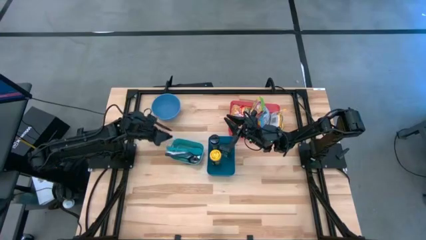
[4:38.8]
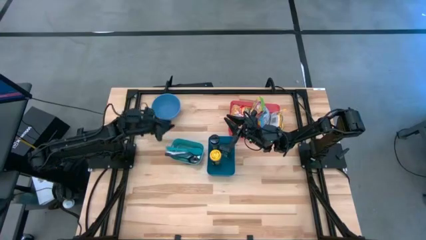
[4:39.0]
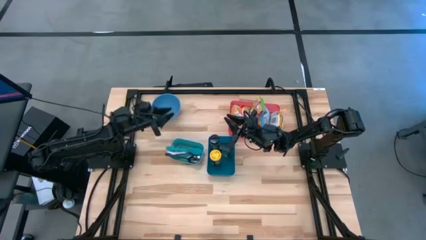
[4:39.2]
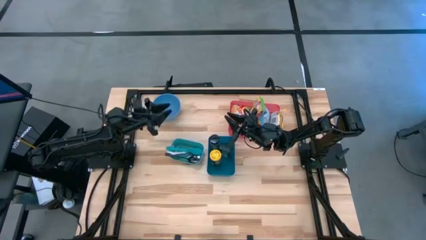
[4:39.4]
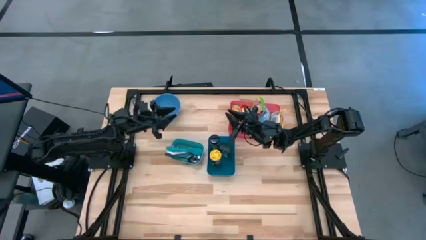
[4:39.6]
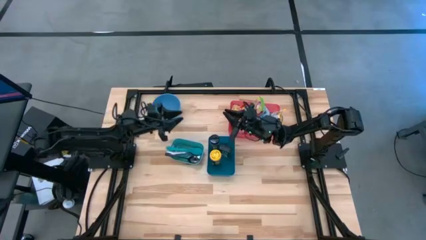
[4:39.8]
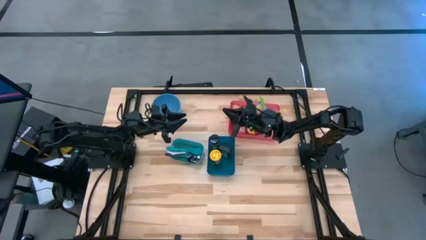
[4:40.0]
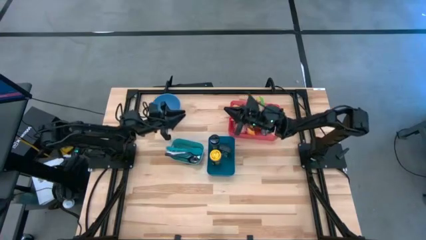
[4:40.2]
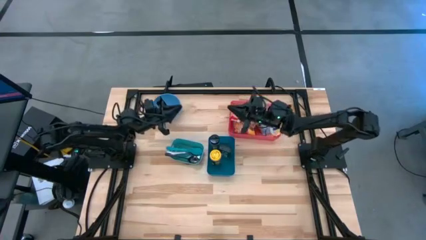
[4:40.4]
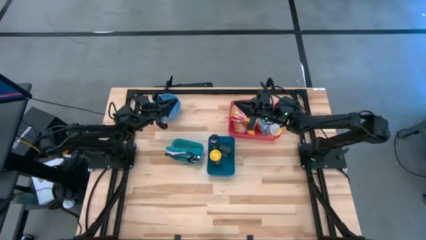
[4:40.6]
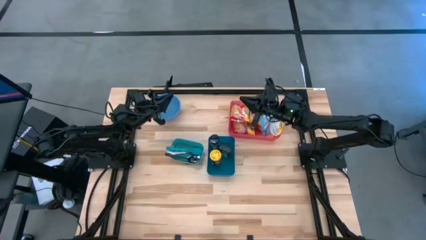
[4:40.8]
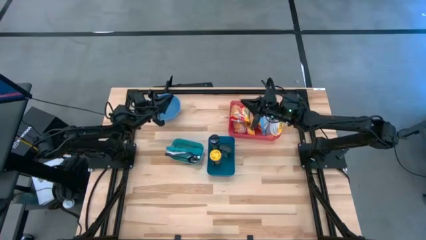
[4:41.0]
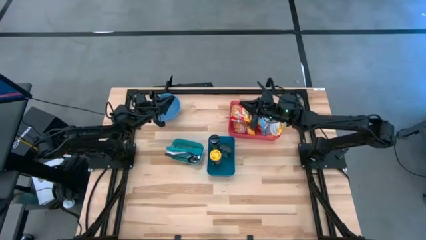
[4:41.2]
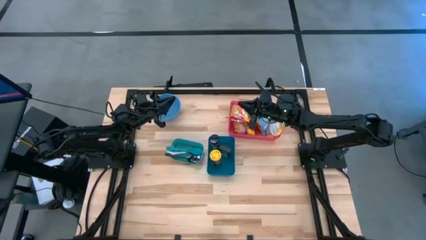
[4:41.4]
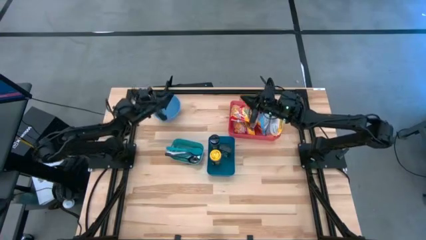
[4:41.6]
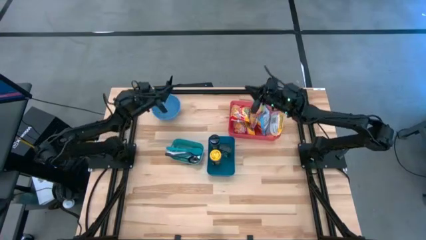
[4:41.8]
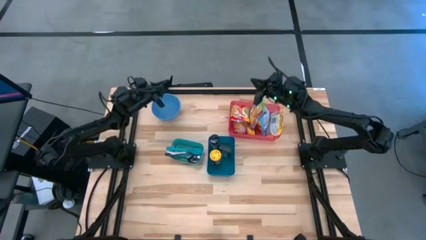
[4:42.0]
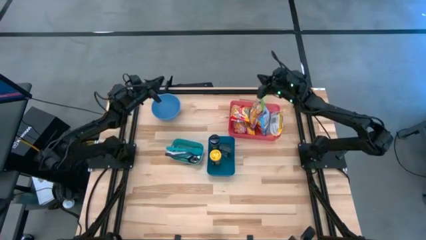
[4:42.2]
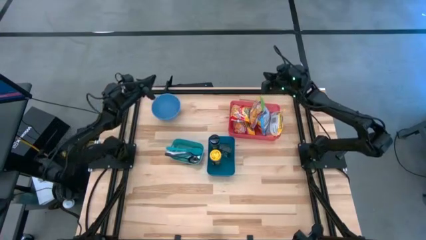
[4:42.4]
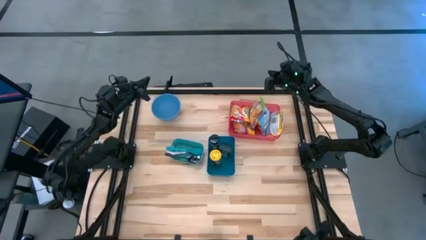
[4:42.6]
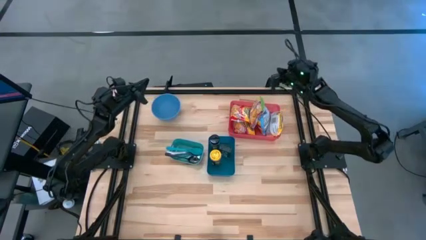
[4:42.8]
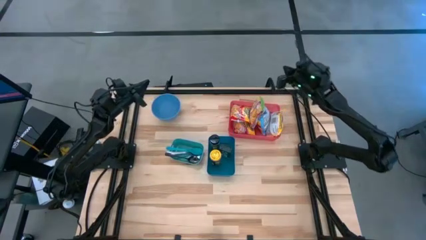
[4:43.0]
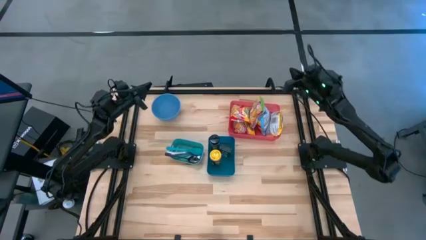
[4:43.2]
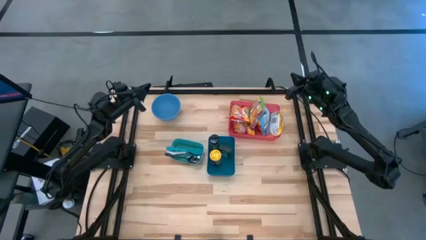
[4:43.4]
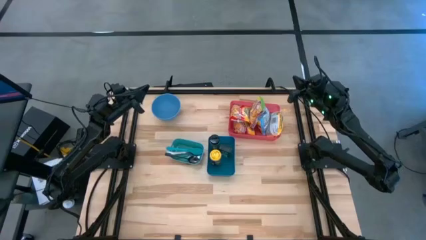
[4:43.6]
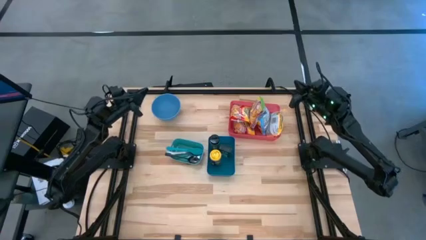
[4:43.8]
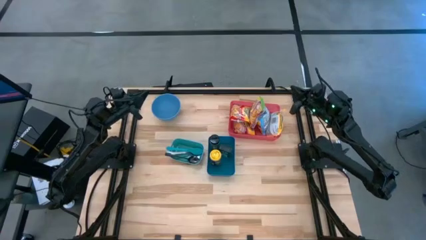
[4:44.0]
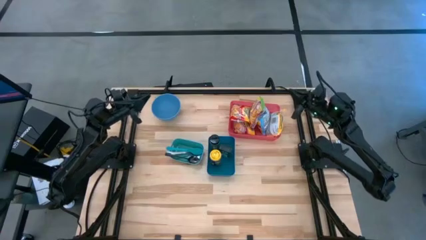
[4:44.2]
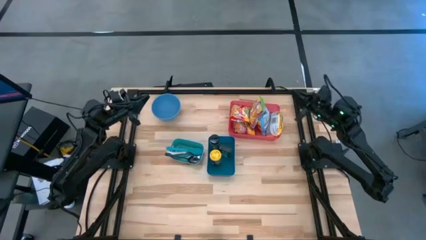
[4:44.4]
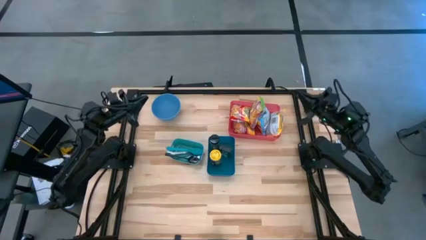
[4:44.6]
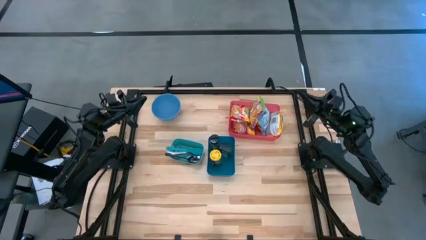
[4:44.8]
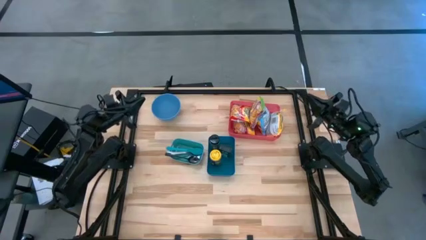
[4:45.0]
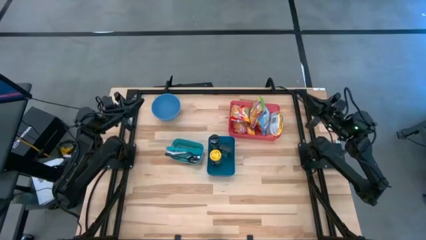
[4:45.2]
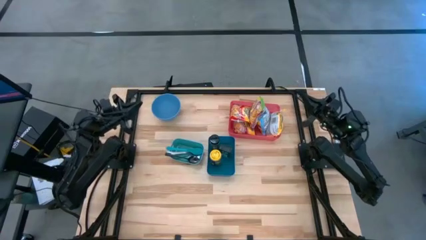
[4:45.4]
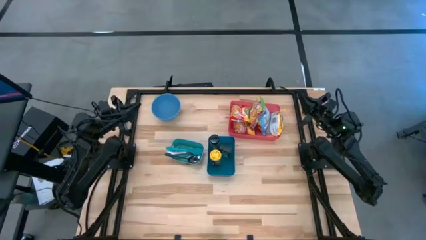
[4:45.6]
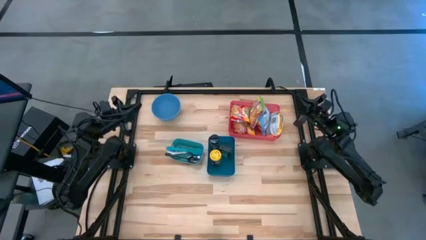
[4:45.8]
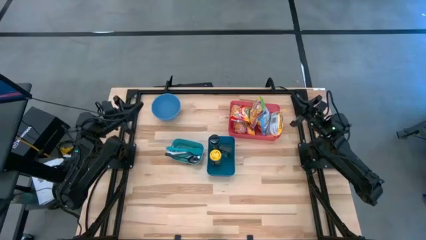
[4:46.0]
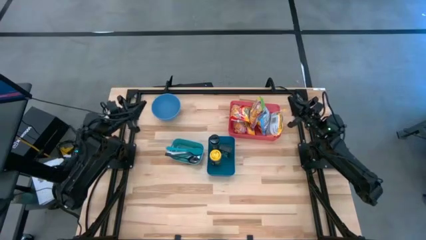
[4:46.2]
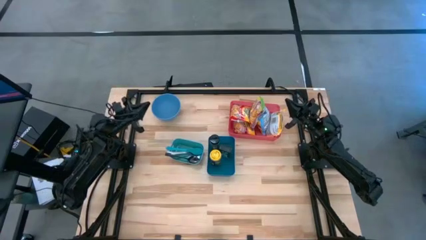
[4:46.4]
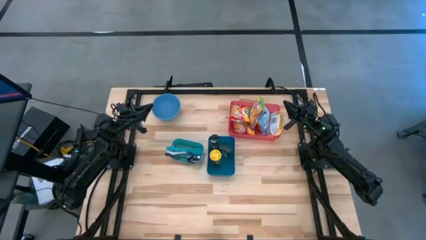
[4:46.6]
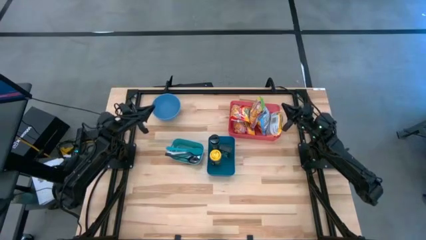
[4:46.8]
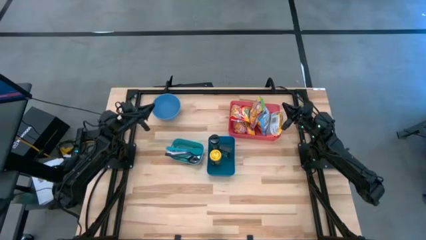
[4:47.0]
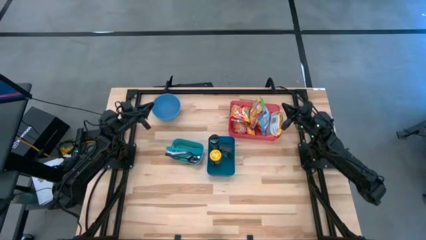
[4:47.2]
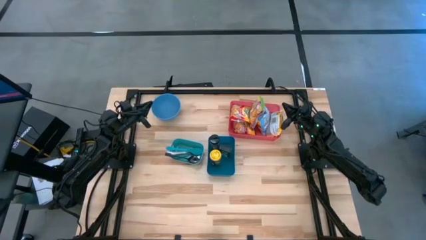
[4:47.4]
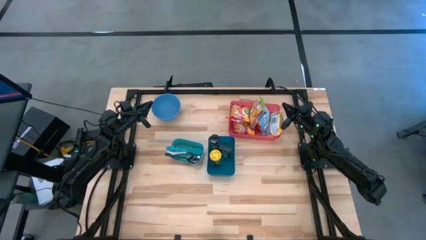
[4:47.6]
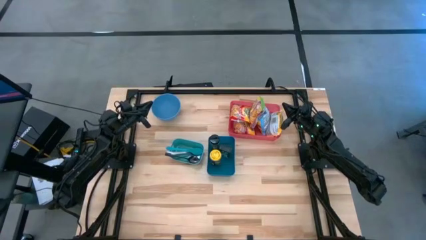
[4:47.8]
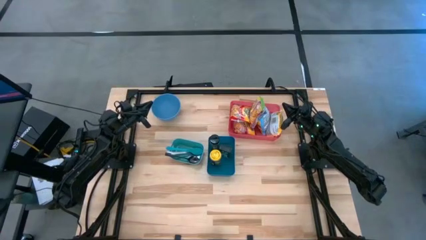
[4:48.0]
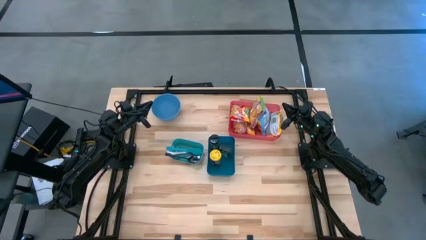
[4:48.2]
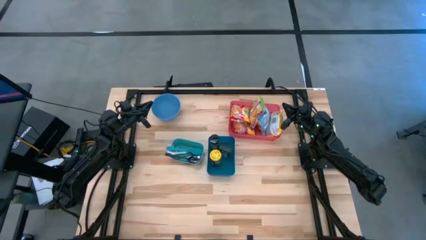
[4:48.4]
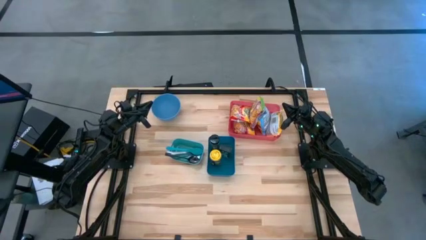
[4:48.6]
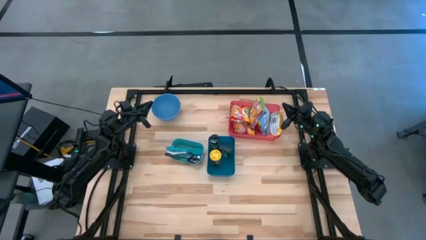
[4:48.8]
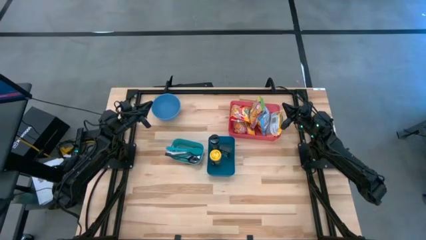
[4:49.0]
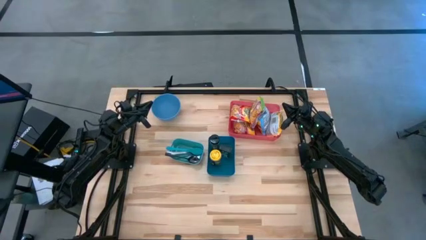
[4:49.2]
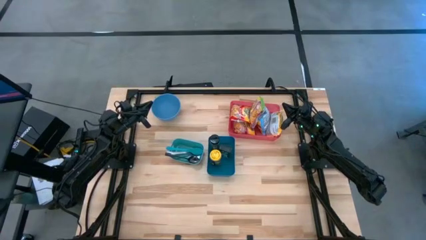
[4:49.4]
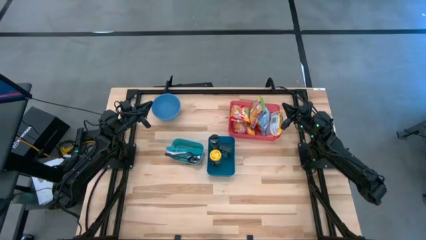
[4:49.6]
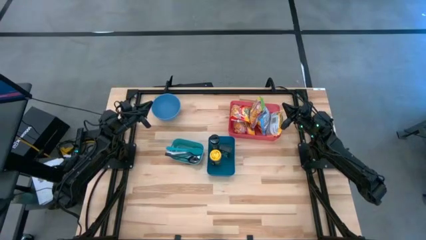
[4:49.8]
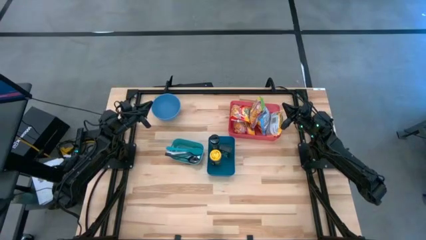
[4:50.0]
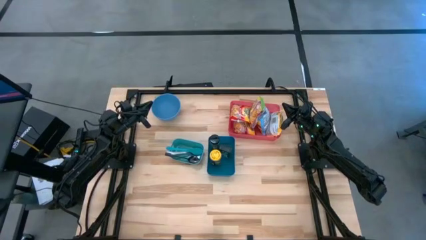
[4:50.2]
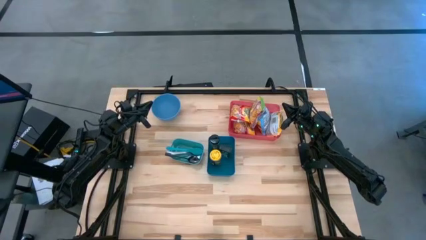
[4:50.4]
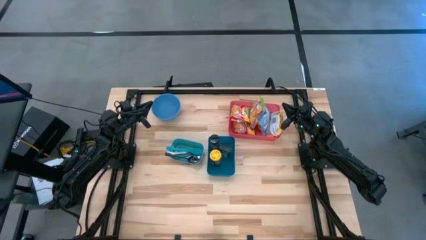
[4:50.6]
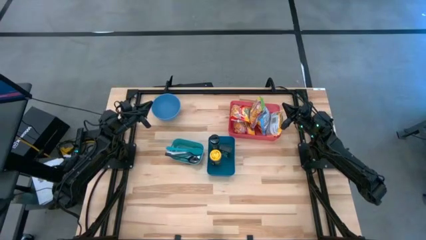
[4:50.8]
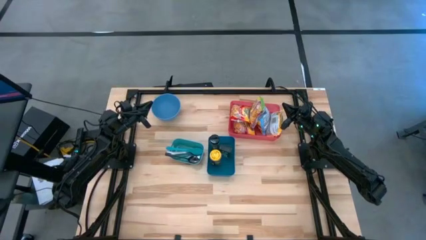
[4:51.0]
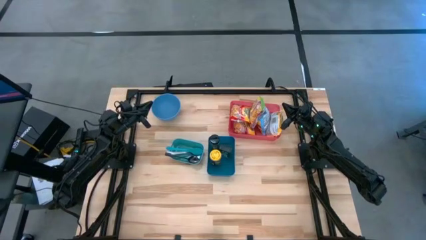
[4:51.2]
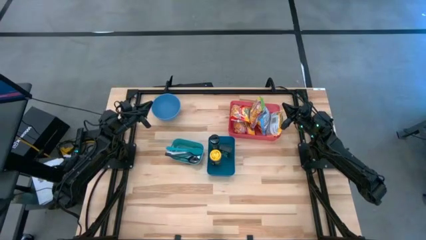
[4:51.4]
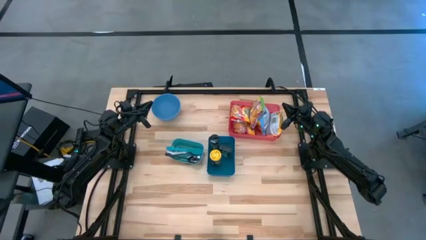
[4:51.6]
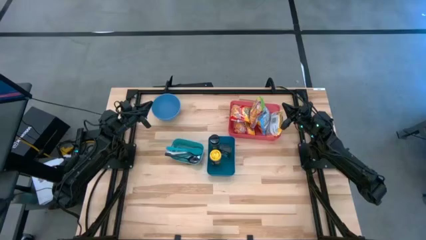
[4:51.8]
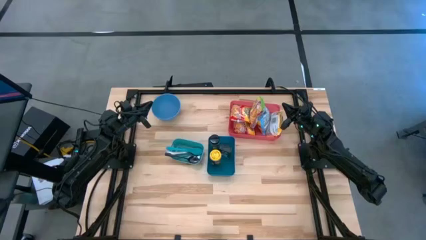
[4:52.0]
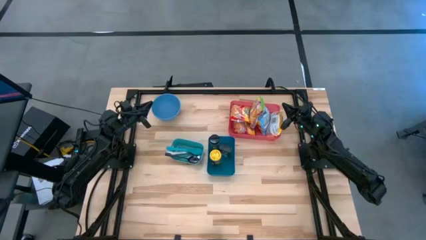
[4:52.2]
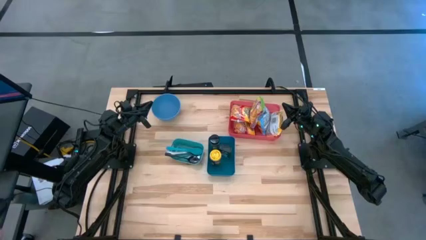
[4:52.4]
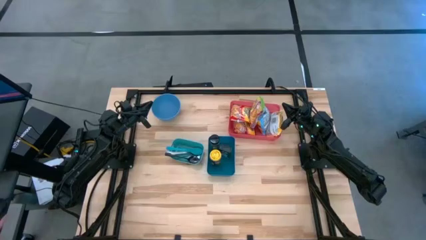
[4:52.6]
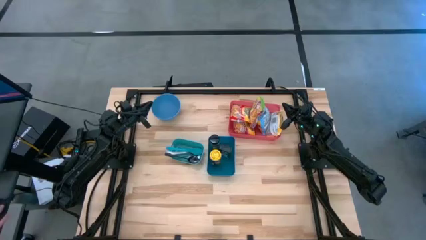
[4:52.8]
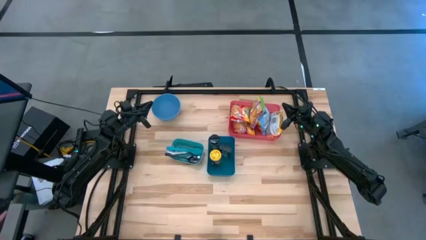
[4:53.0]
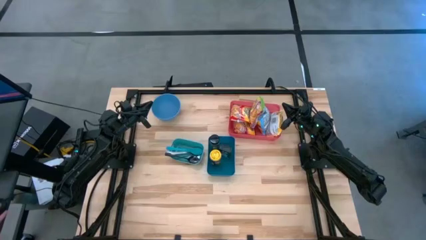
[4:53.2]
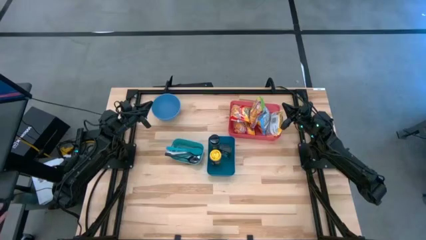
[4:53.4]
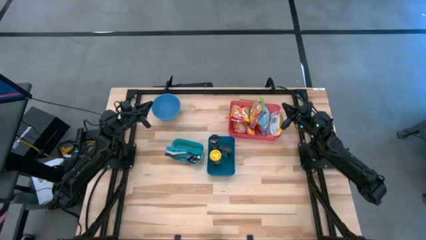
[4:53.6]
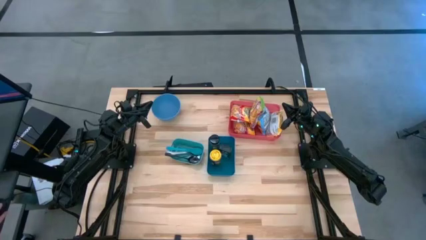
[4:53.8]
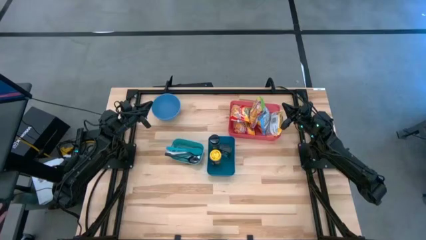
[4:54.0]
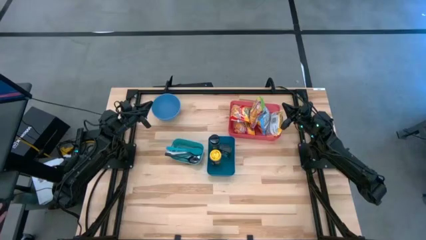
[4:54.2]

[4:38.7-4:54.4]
Task: Pick & Place Food Item
Return to Home Position

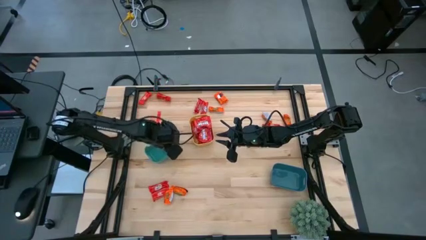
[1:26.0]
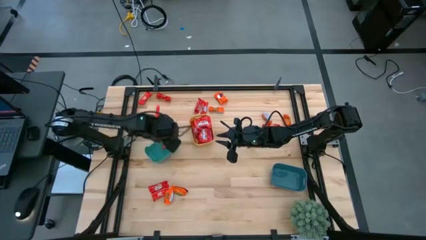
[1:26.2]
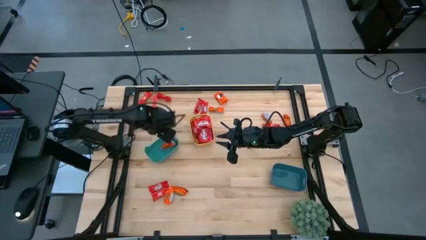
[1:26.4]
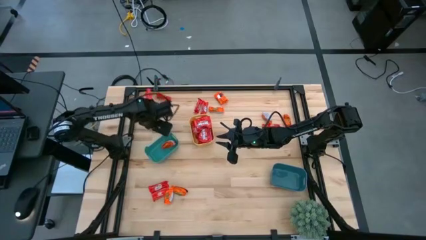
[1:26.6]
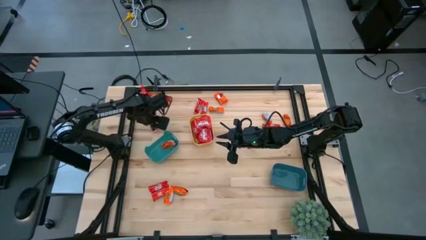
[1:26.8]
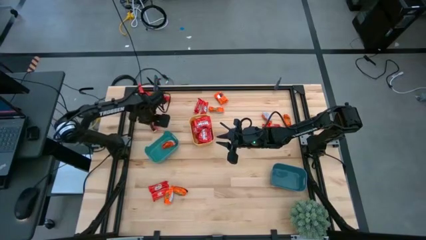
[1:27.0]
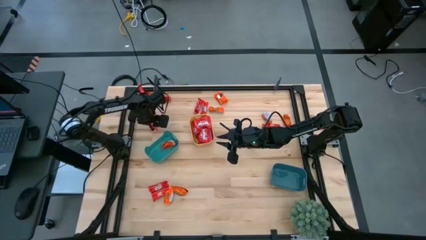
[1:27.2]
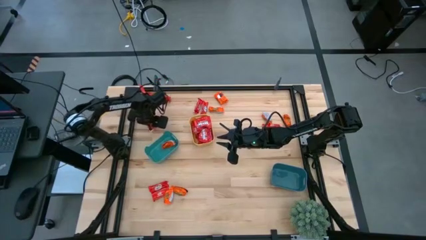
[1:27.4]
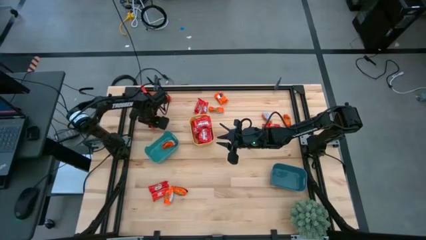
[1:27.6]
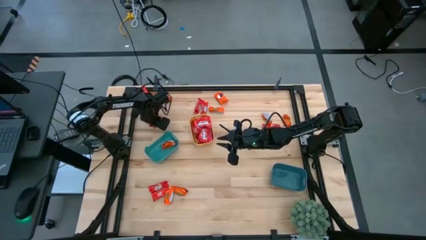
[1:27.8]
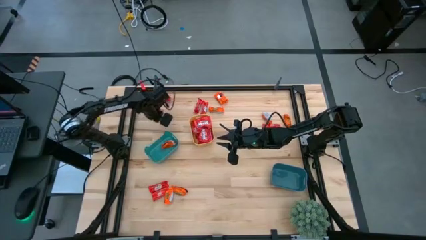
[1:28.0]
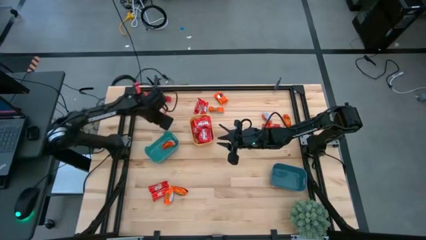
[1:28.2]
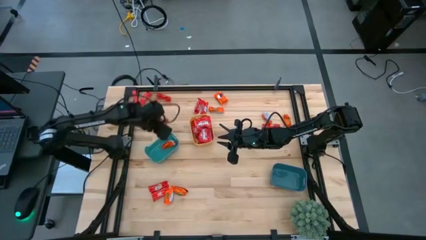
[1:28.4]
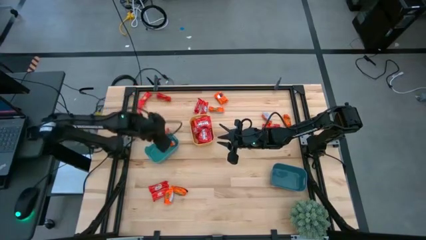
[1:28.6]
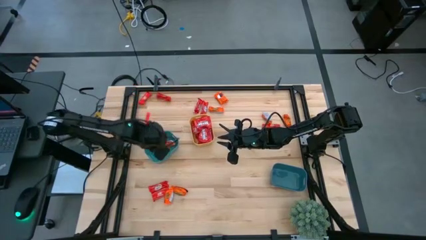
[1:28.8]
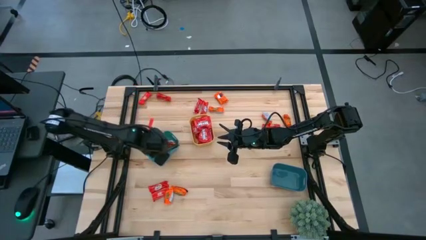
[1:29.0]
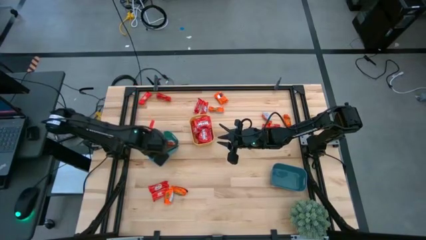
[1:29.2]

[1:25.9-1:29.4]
Task: Sort candy
Put the orange candy into the green bin
